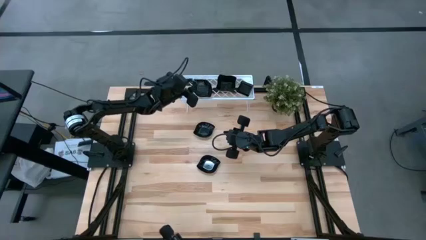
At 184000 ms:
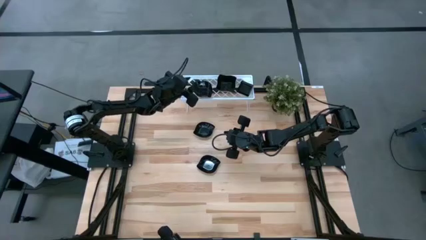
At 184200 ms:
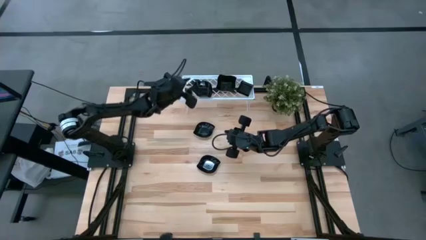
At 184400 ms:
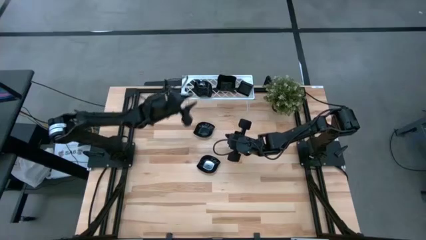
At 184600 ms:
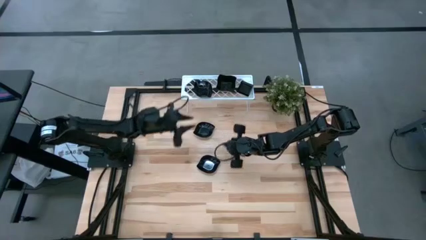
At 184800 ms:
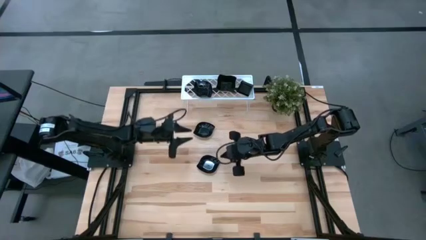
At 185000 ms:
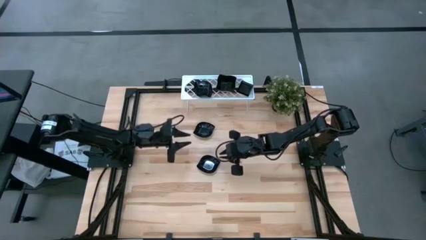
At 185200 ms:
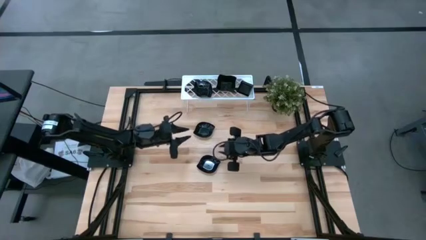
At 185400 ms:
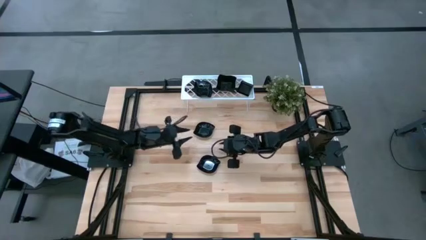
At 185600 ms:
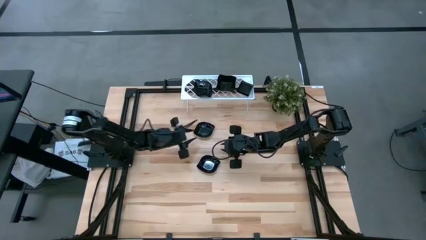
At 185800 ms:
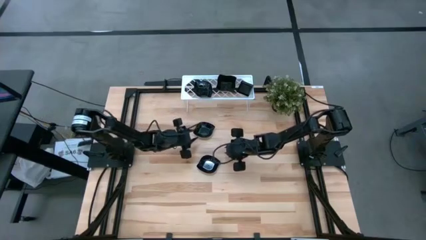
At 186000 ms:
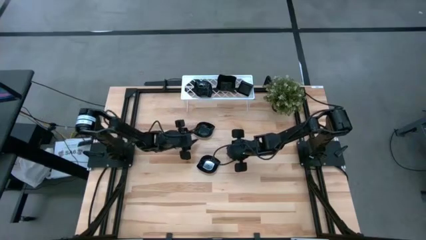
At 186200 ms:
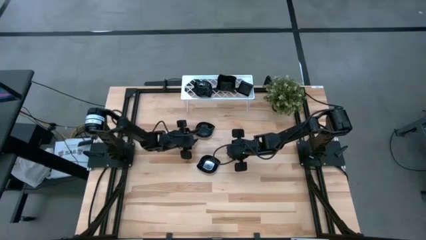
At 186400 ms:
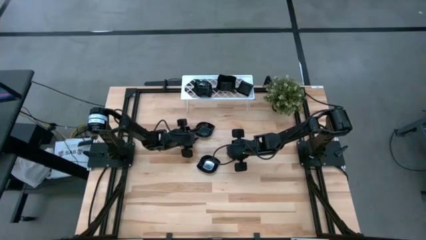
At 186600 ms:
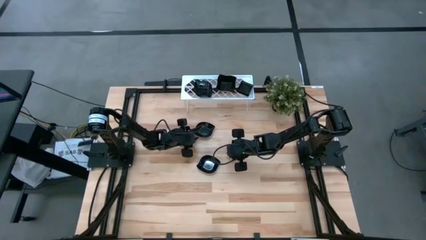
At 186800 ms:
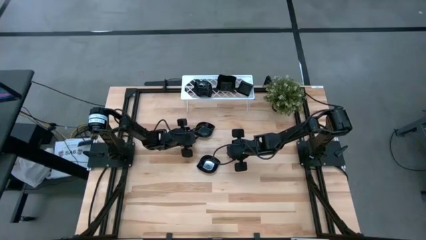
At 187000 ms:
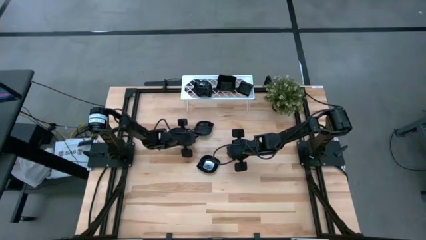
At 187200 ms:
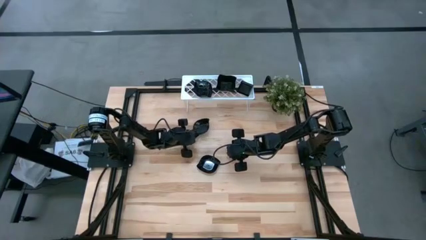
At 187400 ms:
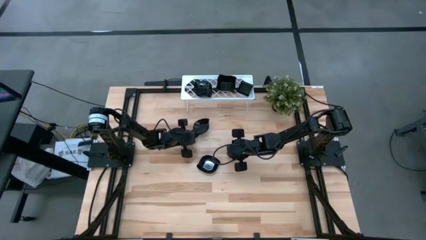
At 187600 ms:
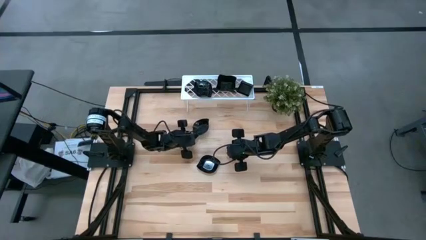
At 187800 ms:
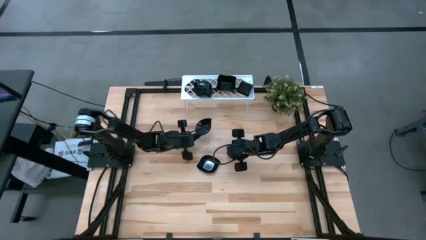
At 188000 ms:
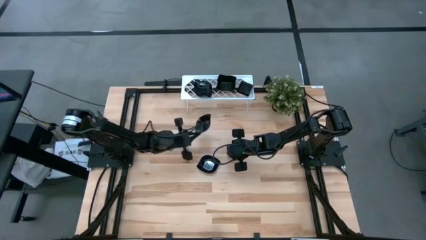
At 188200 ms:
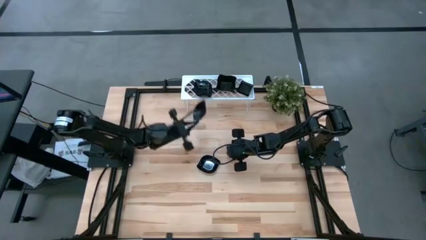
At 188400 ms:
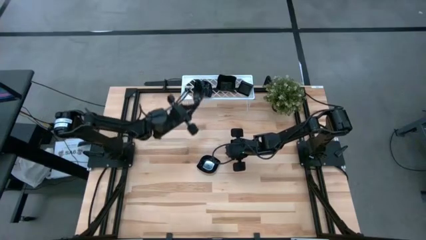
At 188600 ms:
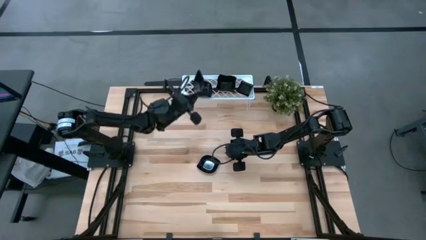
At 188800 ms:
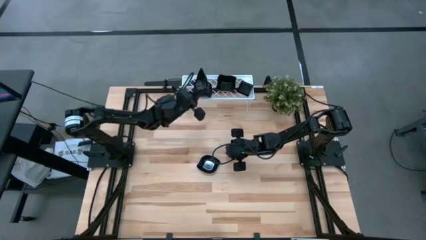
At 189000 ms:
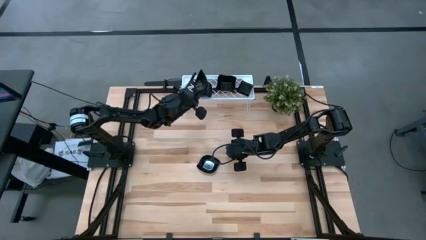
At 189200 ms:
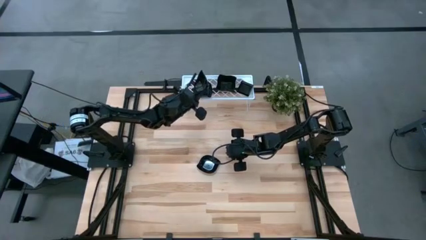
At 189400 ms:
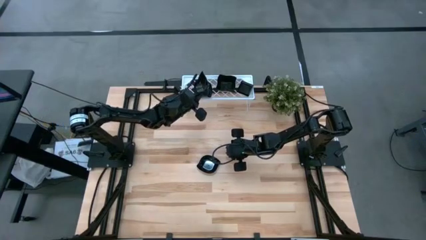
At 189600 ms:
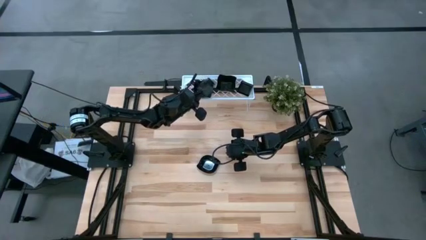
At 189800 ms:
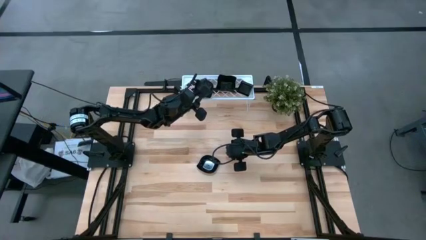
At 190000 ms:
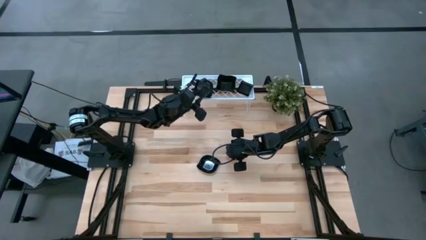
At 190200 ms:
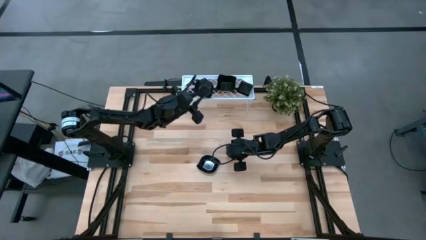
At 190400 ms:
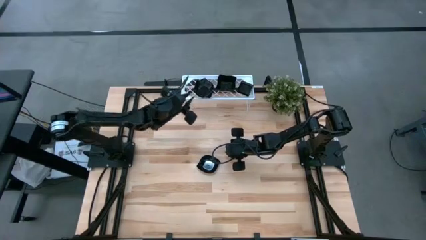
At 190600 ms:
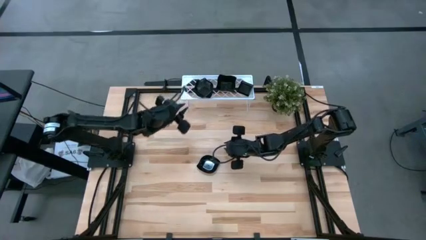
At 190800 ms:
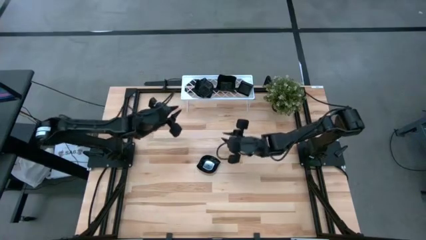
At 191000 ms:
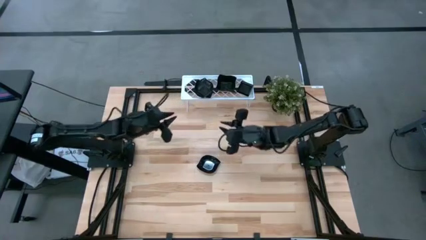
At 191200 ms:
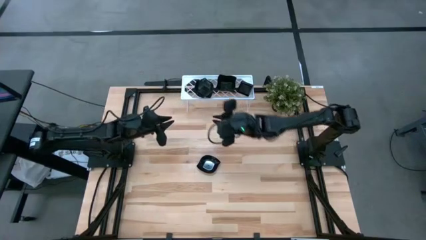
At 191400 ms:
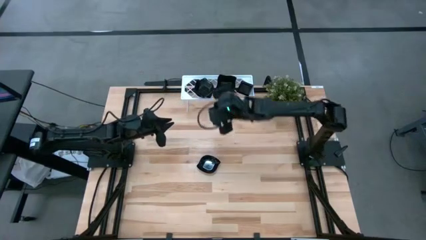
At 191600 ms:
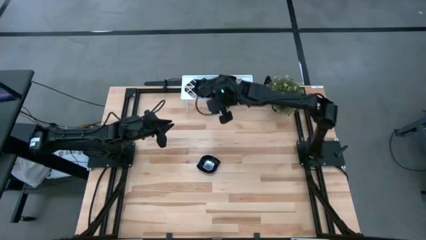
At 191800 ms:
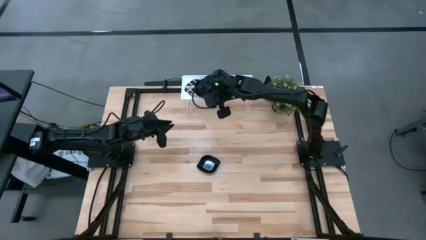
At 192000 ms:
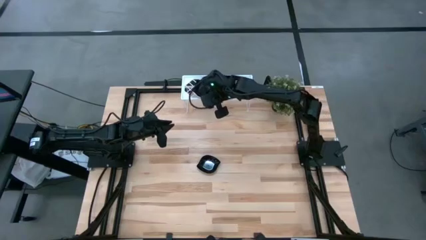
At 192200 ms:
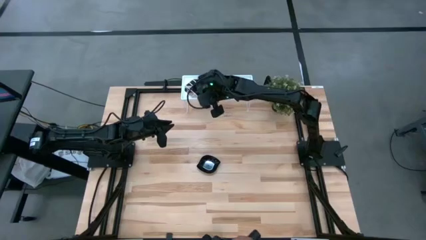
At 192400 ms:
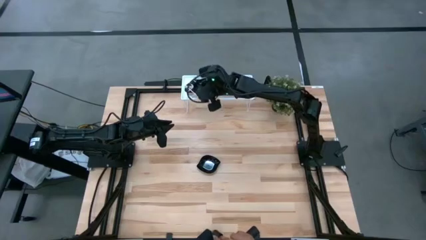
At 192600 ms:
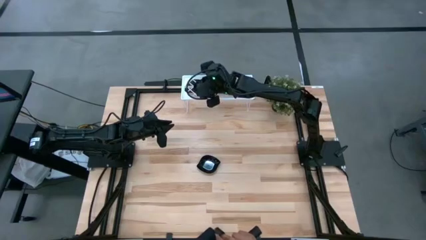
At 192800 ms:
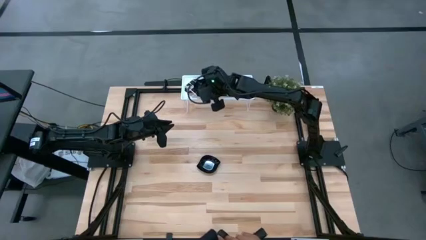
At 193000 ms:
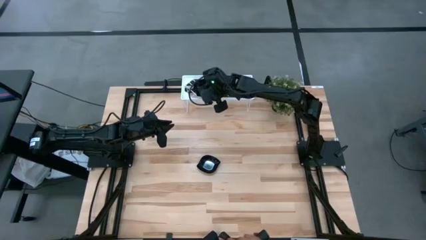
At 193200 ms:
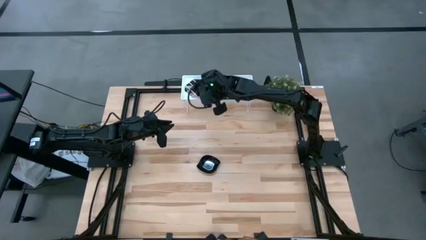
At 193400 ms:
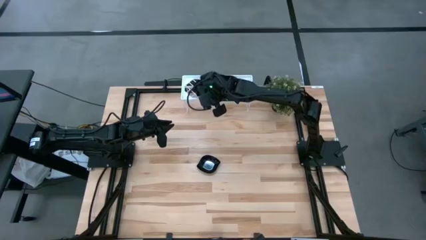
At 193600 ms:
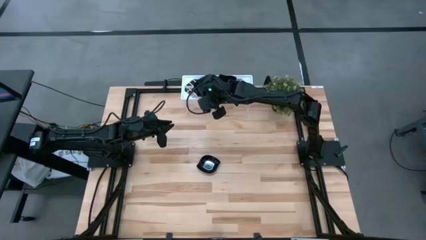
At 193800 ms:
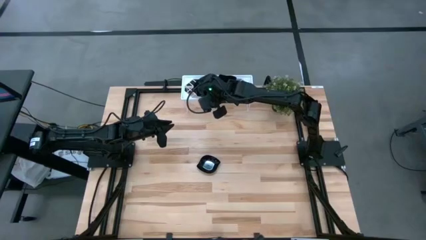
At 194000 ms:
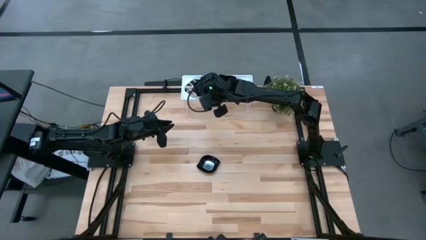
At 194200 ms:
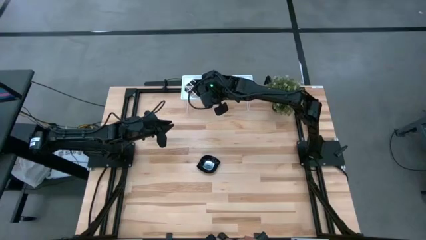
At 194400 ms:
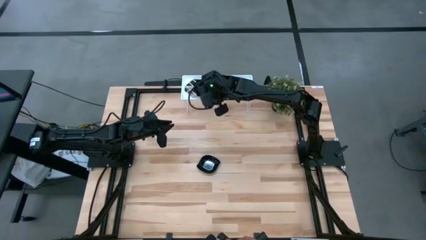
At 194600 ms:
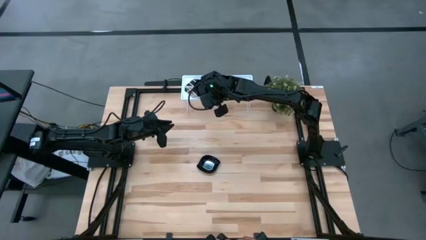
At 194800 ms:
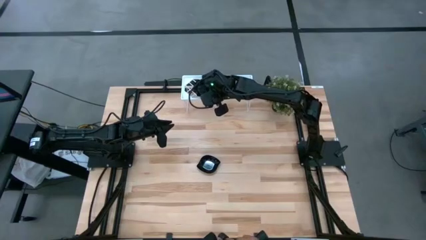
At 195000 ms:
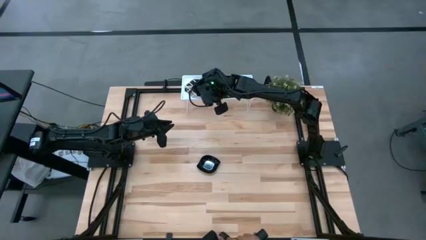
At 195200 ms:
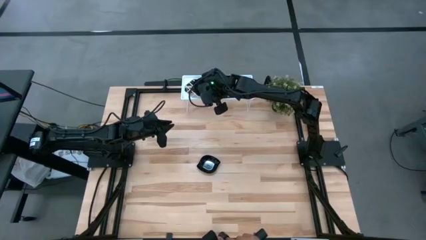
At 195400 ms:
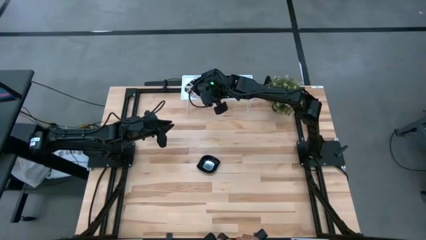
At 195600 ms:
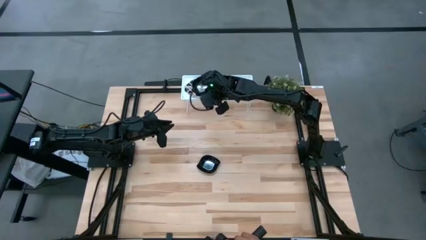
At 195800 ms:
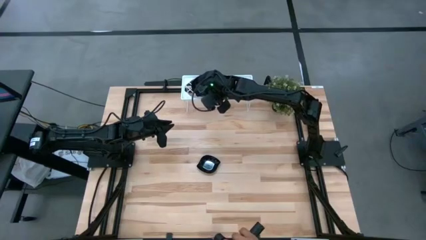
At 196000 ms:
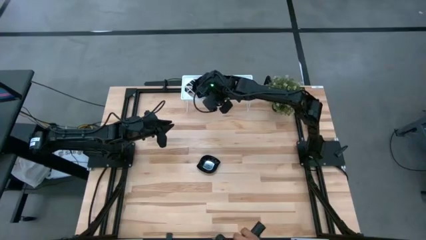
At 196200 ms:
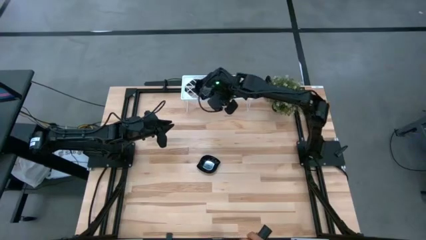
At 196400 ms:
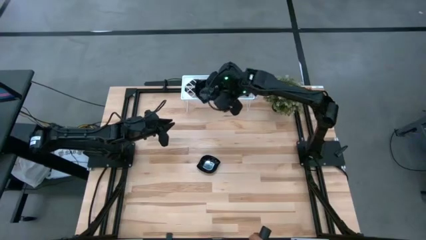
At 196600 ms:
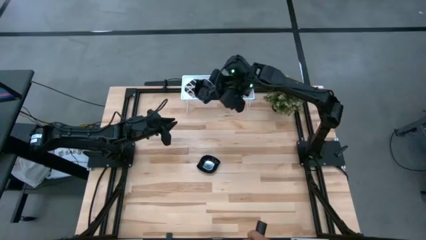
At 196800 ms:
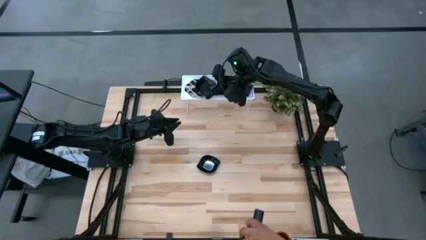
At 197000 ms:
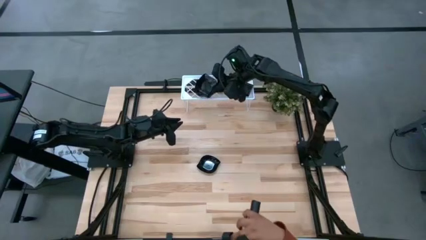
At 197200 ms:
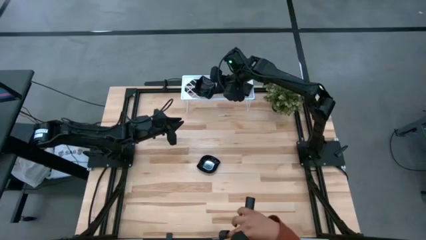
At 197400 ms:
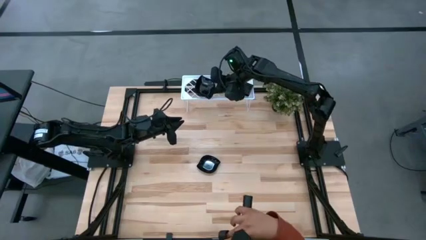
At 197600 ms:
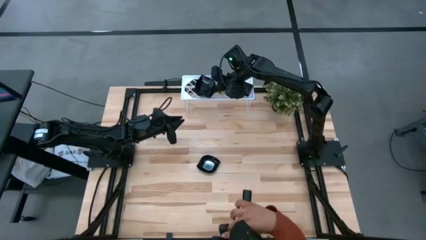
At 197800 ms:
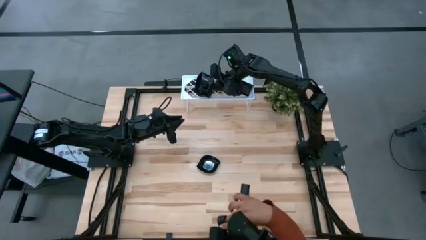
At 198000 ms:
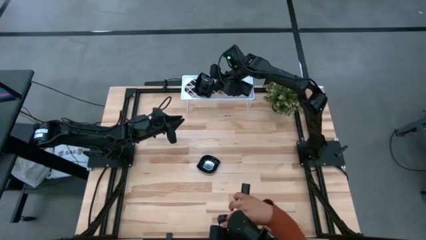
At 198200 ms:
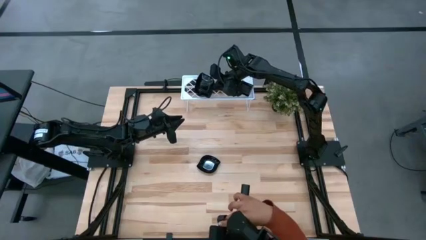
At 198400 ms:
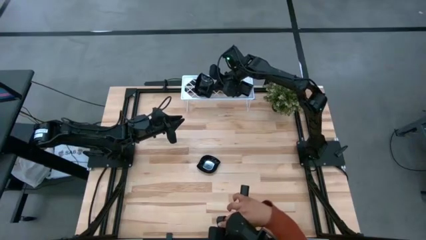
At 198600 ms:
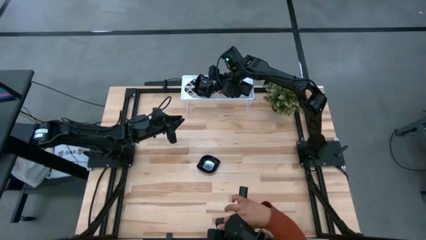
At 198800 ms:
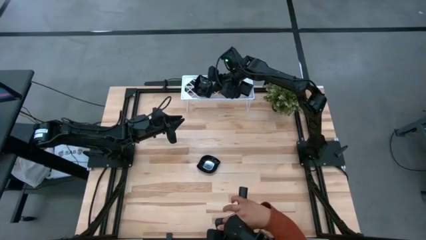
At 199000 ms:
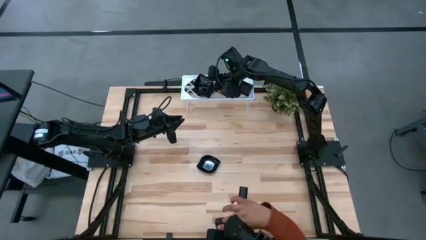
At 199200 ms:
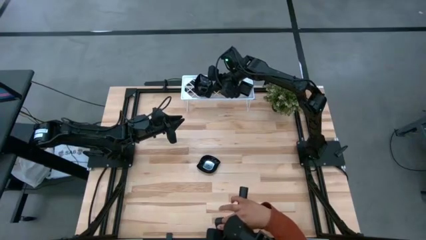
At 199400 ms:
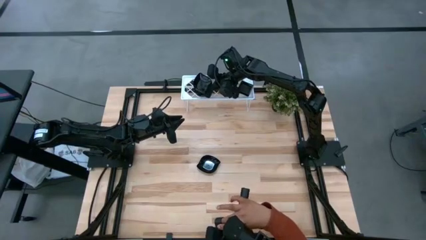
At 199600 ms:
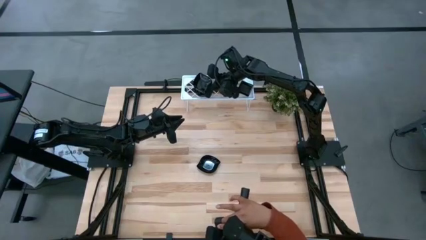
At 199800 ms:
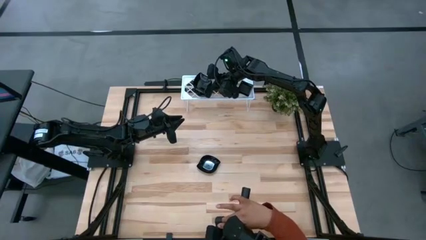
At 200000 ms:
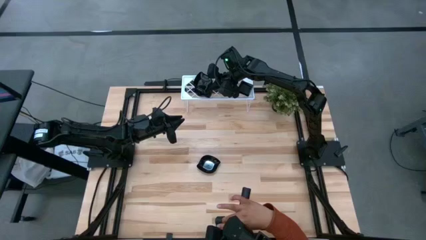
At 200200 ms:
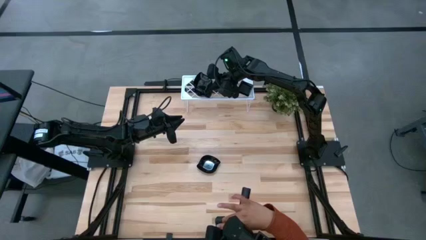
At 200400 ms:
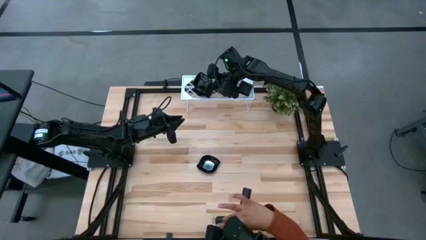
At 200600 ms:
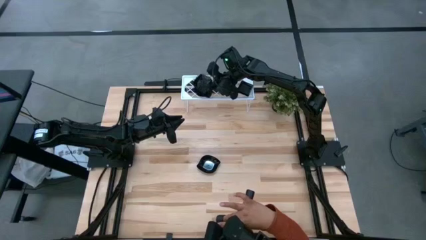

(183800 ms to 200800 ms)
Task: Pick & Place Mini shaped plates
Stack the black leaf-shaped plate on top of the black leaf-shaped plate on the shelf

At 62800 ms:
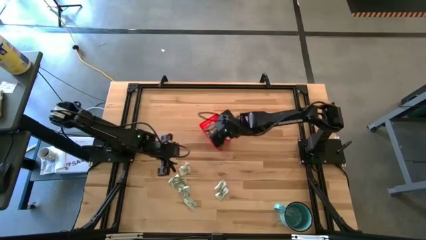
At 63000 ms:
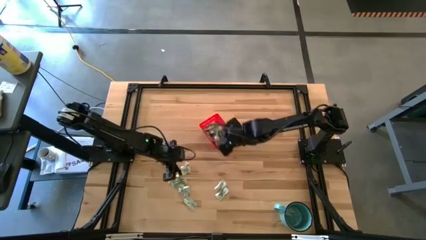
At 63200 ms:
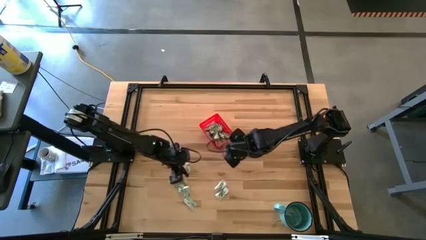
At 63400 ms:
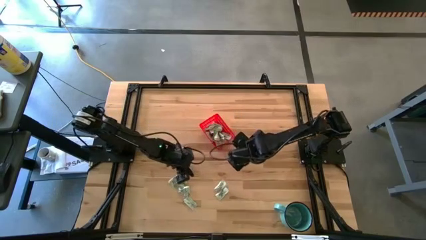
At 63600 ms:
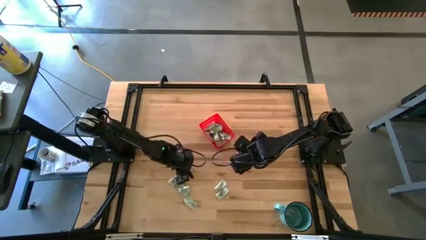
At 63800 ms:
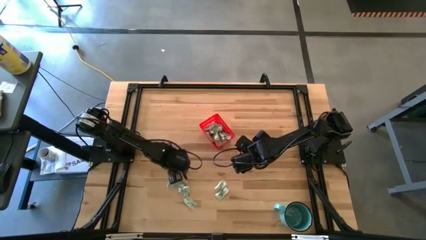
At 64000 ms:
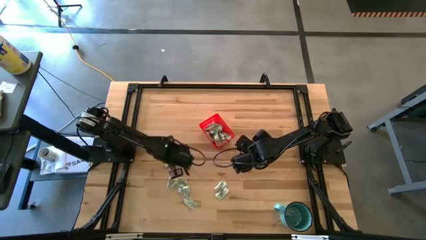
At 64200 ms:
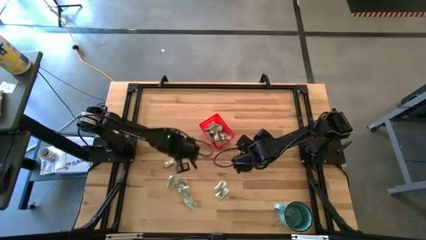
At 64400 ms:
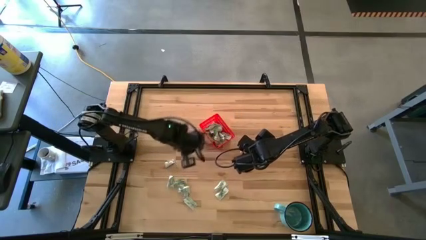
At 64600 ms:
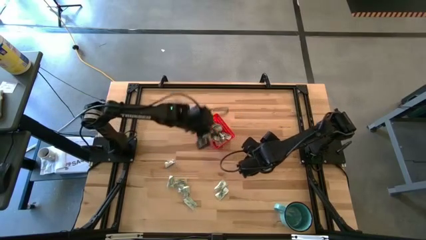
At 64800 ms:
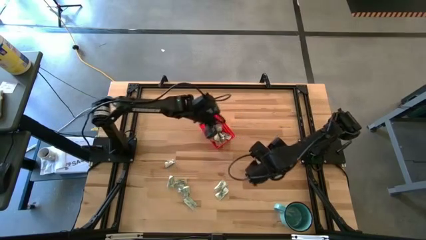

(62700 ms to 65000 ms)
Task: Pick and place Stevia / Truvia into bins
Put the stevia packet into the red basket
